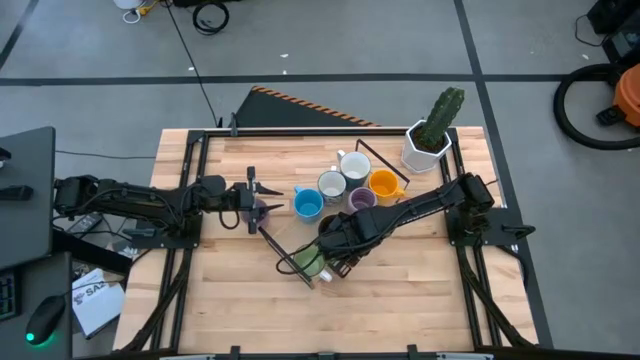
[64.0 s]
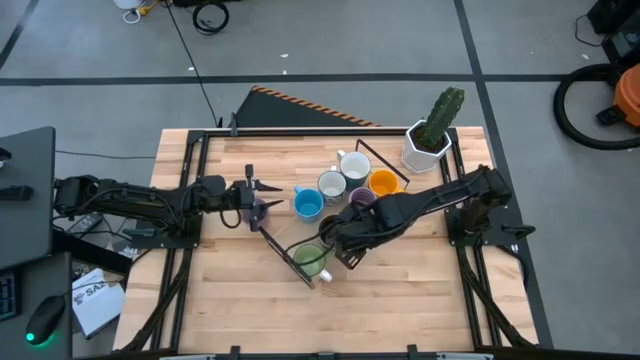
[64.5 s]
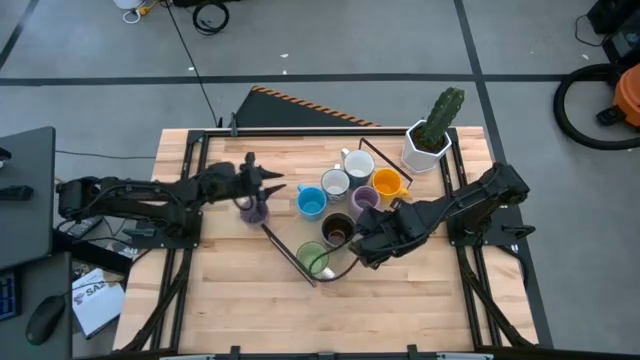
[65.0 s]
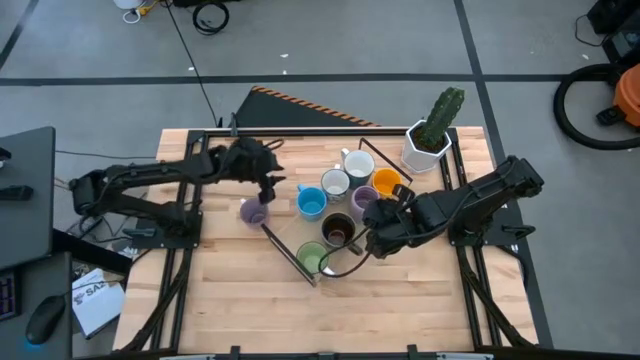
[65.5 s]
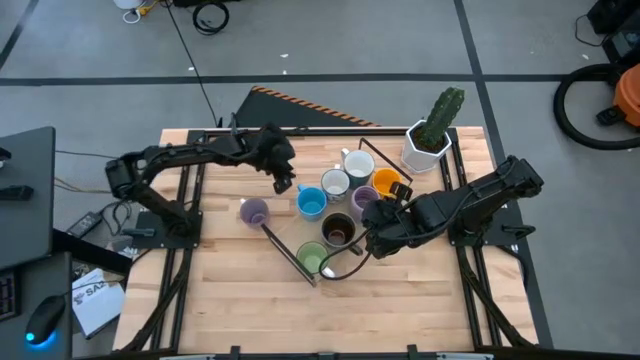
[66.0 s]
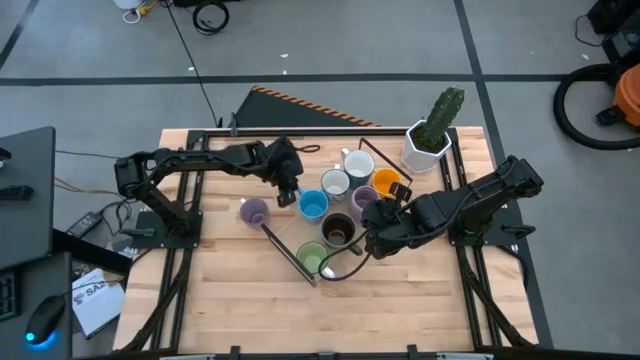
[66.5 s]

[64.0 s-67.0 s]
Task: Place coffee mugs
Adjust the light blue mug on the shelf

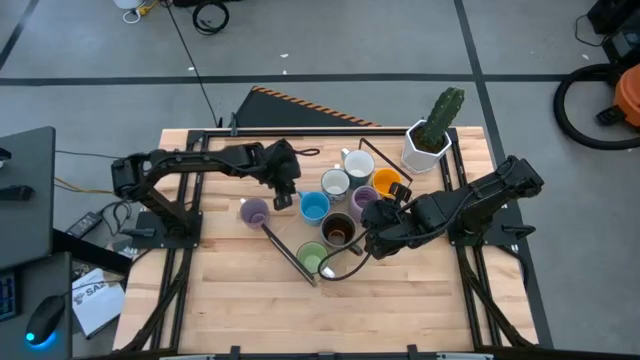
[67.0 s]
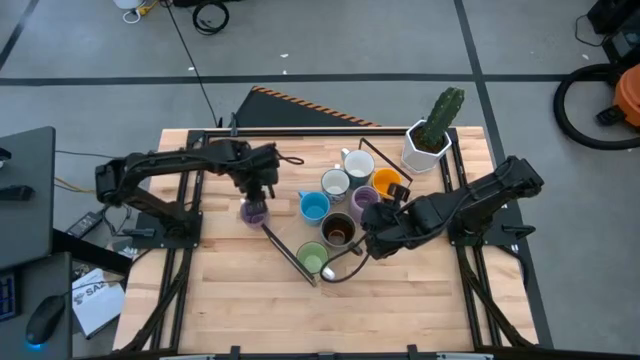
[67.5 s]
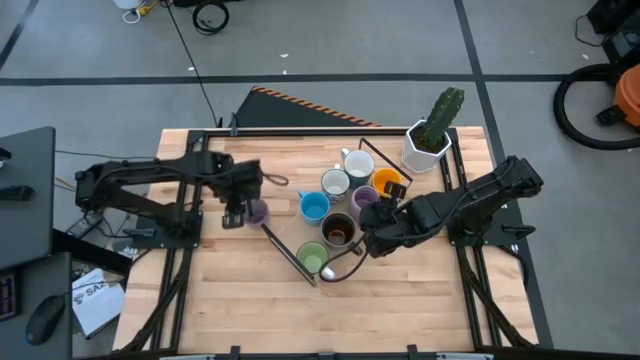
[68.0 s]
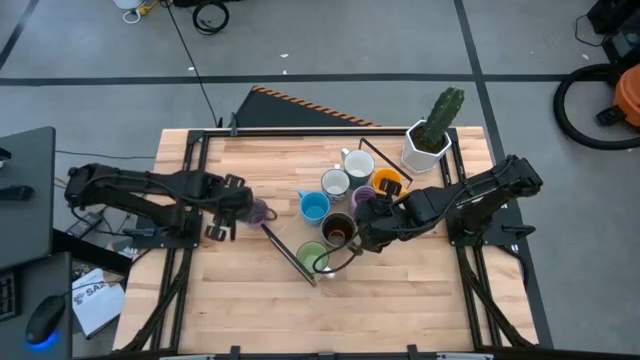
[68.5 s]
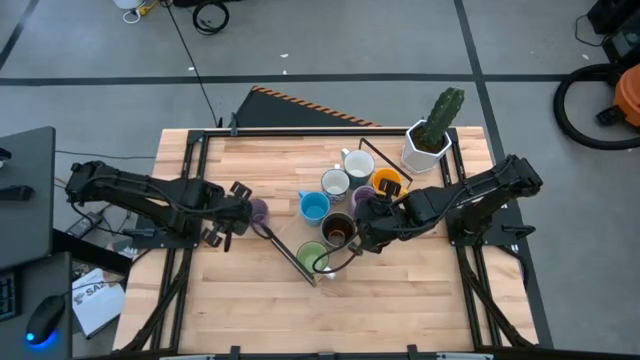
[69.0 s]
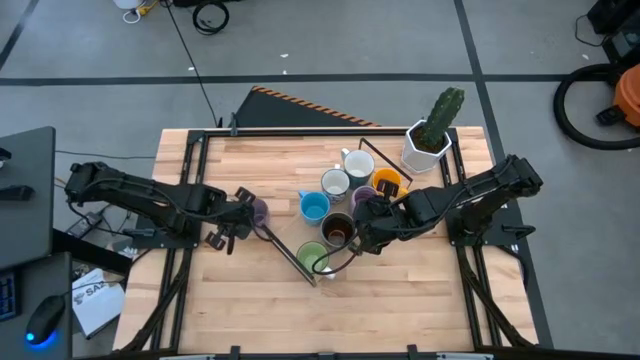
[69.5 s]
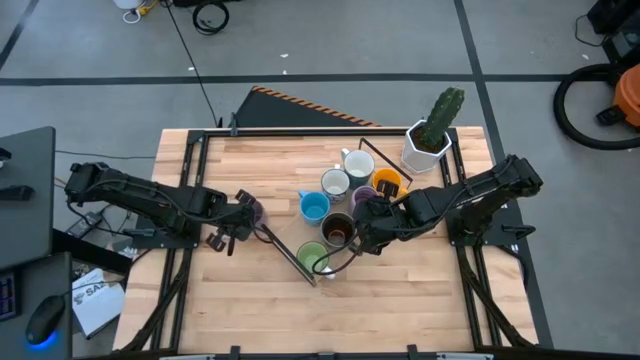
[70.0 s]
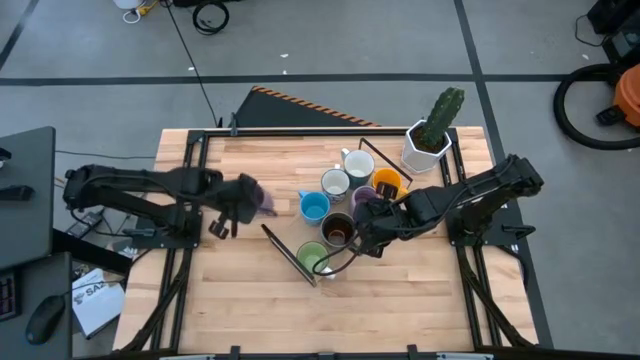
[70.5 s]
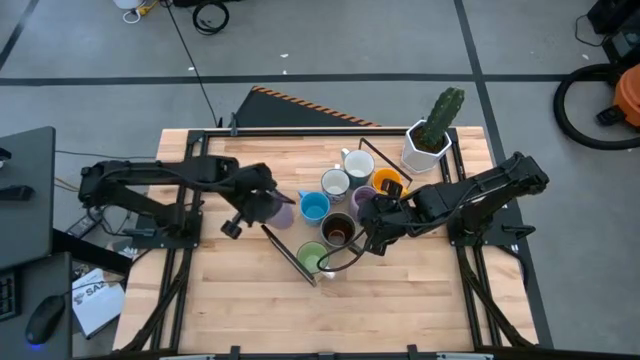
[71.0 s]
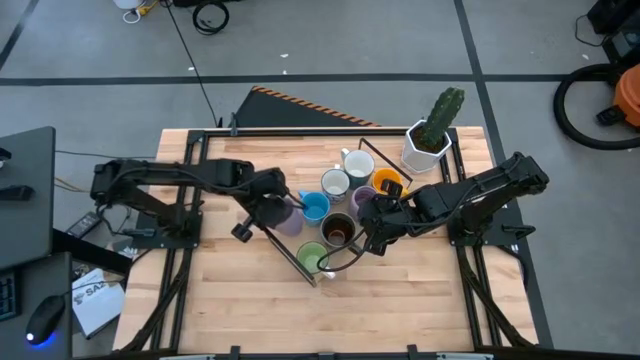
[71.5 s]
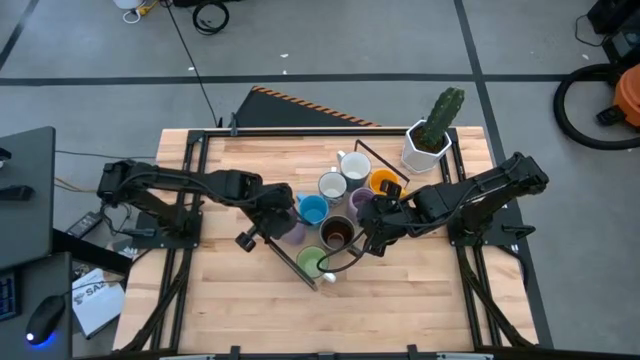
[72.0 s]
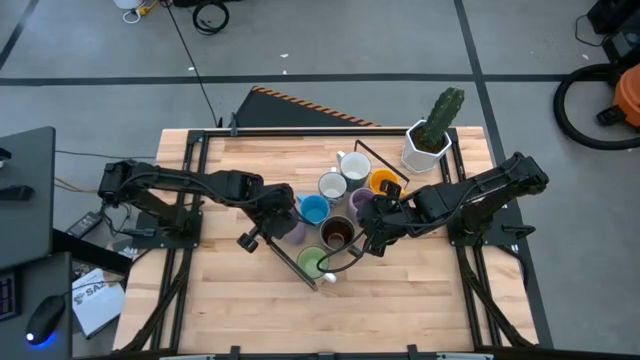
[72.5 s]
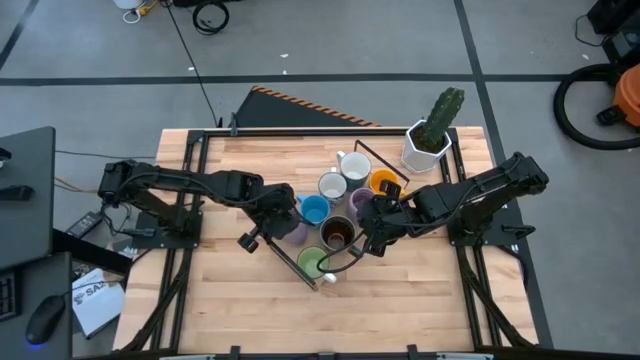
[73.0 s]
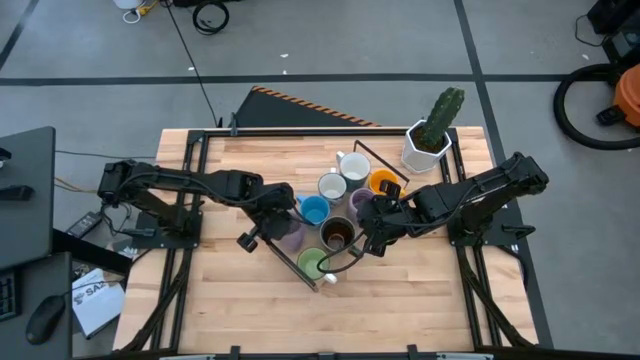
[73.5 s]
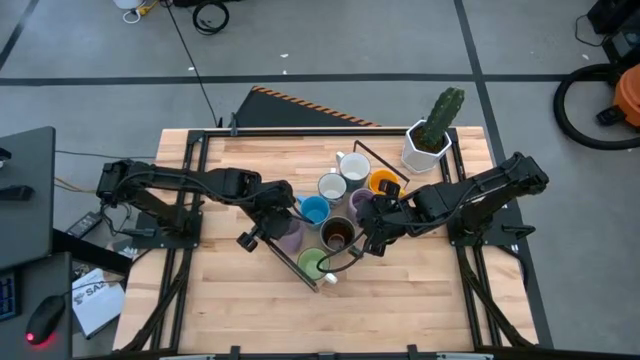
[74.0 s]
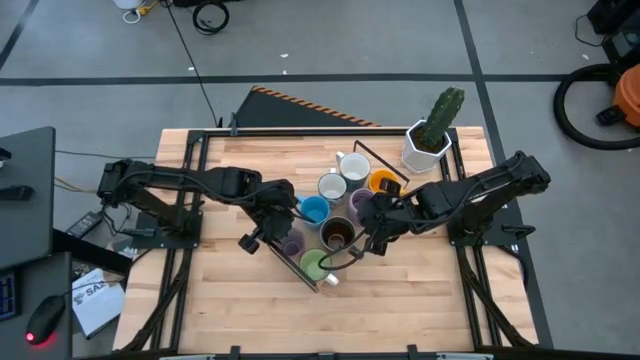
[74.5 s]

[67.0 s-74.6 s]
Put the large purple mug on the shelf

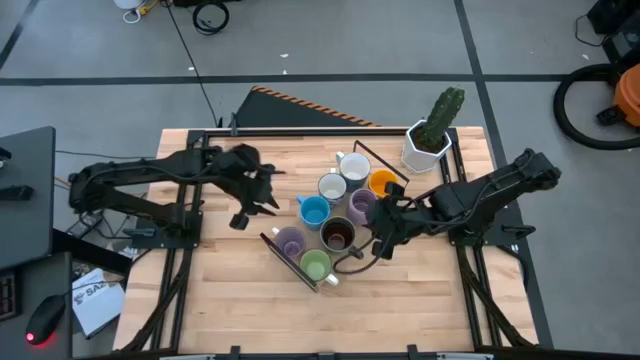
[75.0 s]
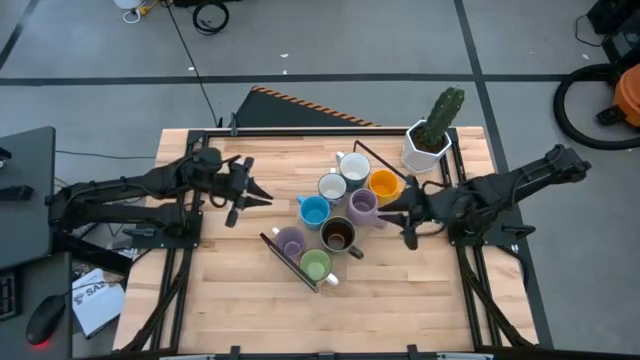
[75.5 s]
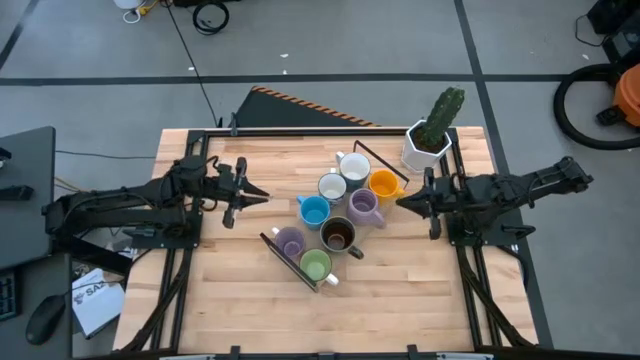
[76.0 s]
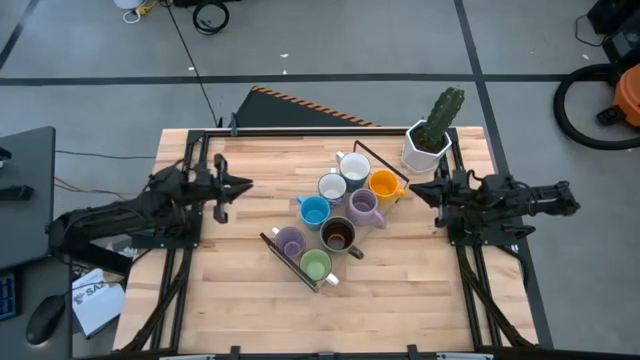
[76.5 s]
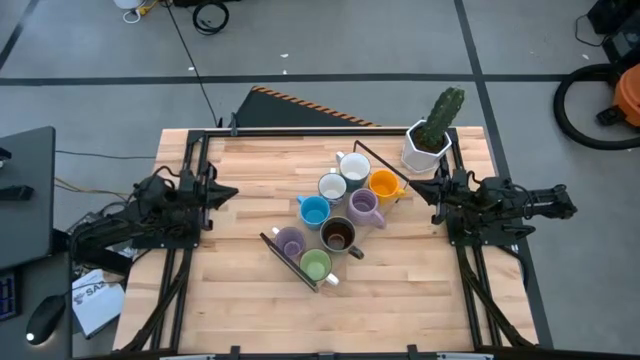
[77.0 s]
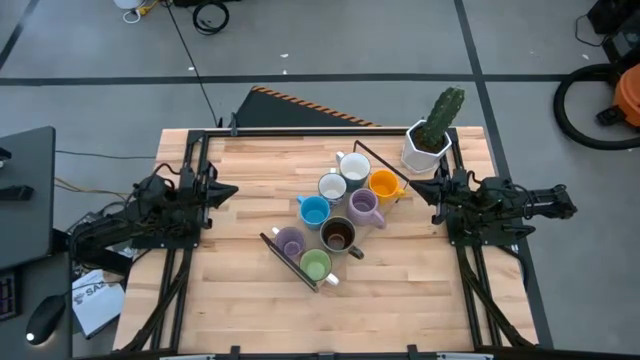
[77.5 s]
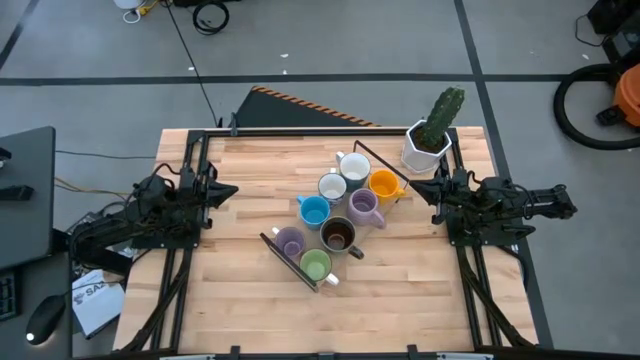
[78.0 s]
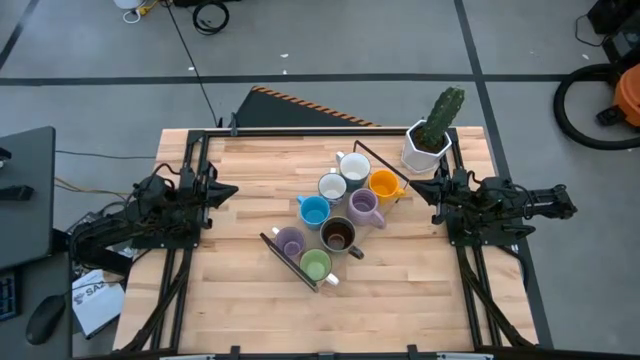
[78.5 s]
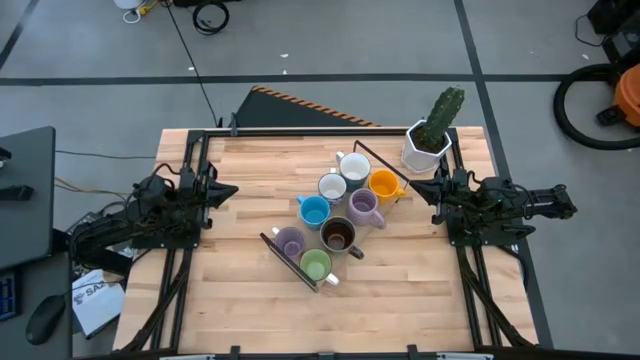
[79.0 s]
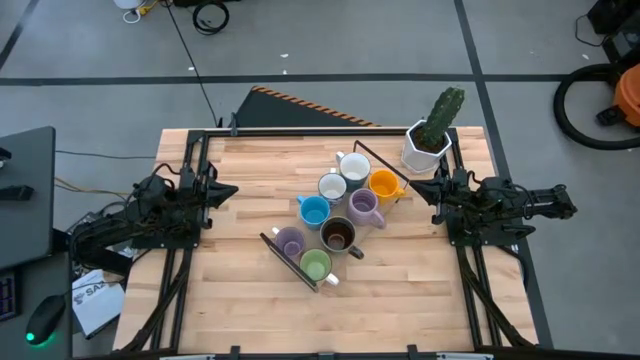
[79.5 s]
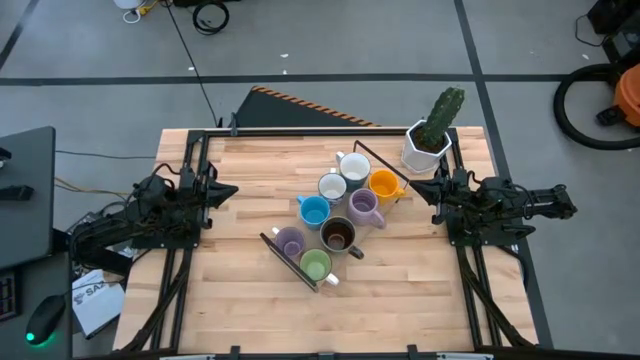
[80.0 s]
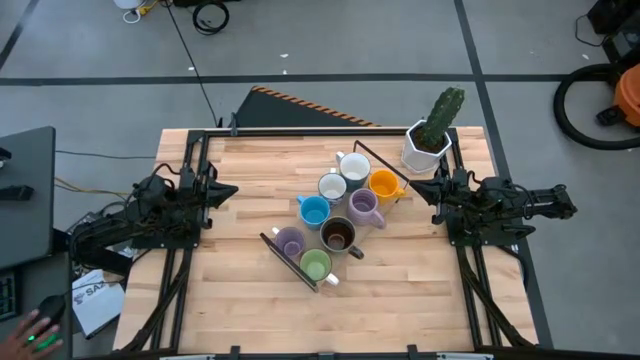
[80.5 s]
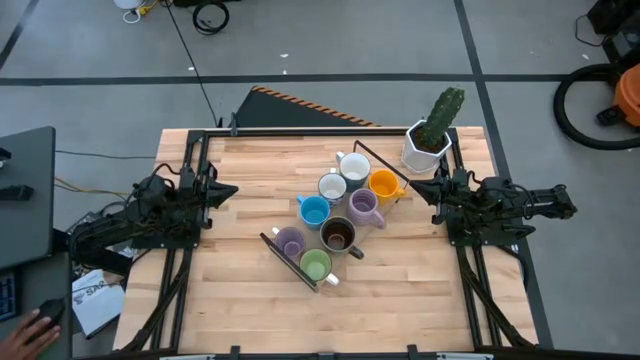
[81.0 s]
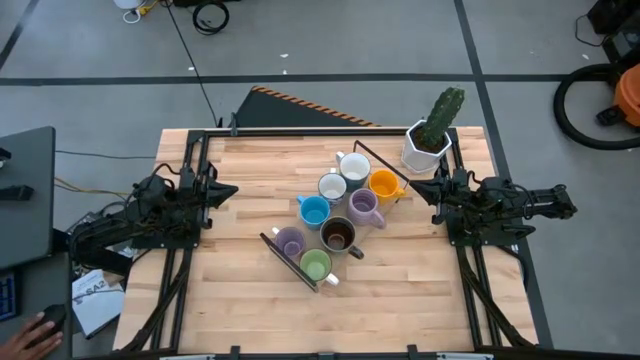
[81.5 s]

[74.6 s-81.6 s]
Return to Home Position

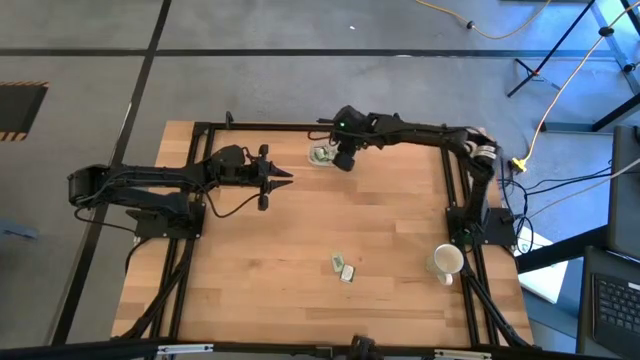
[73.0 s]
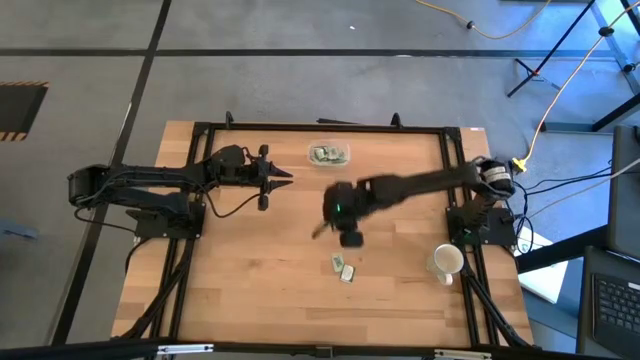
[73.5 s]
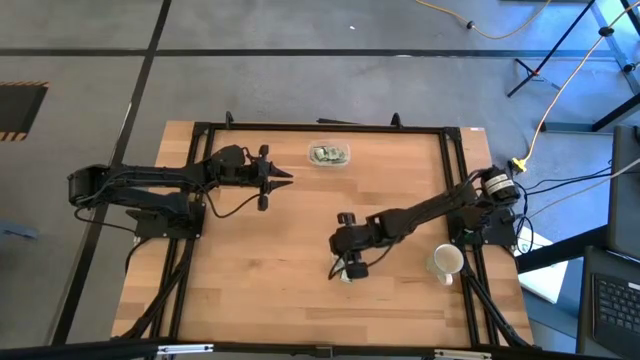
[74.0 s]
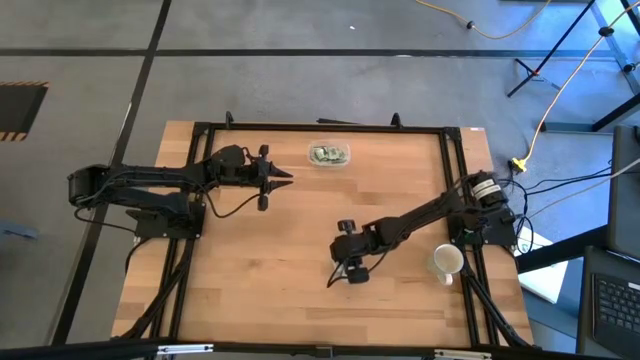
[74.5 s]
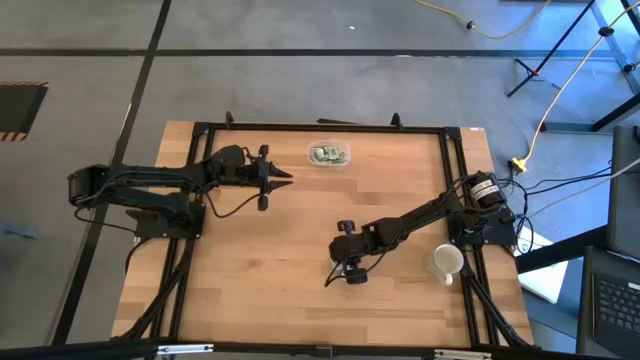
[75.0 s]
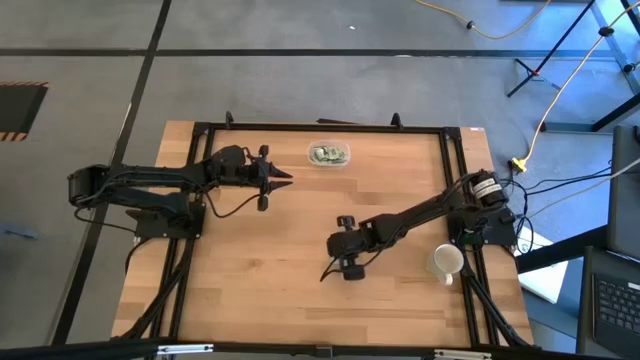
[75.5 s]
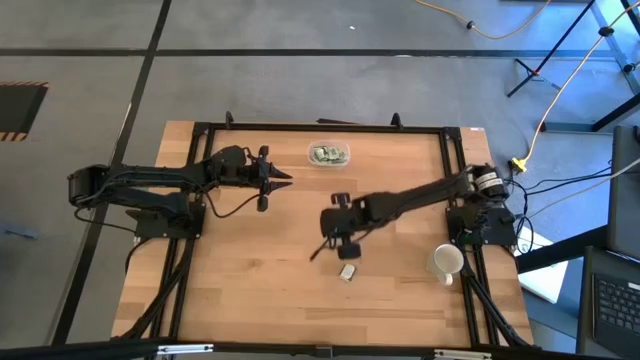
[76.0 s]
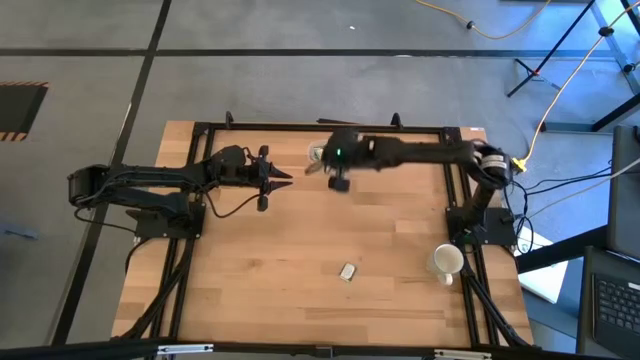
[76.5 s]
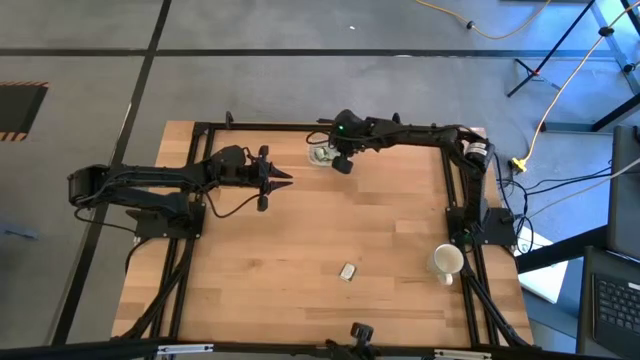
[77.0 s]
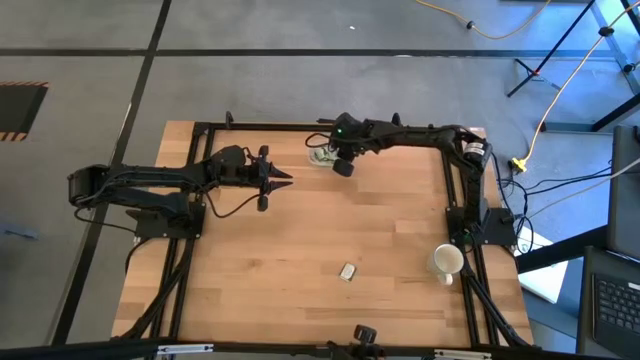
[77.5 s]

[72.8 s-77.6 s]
Task: Pick and place items into bin
Put the white stevia packet into the transparent bin
